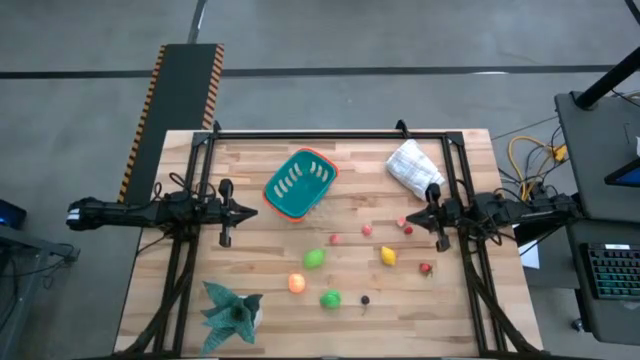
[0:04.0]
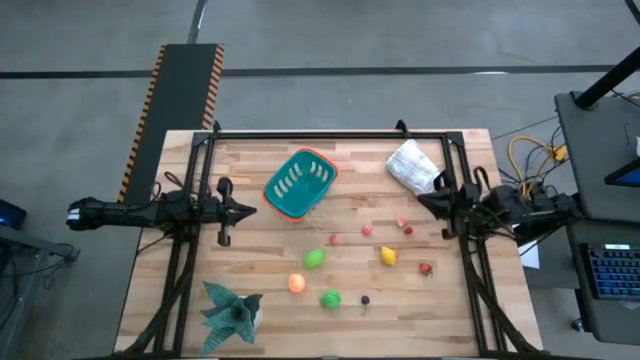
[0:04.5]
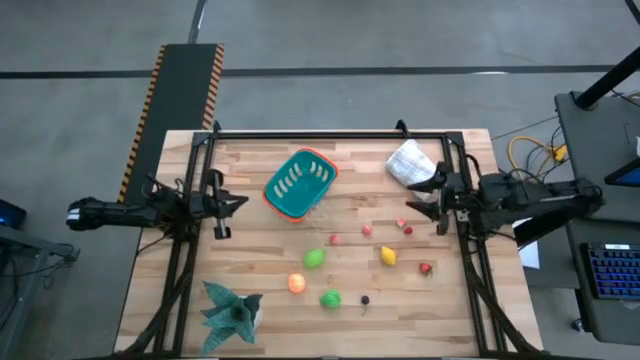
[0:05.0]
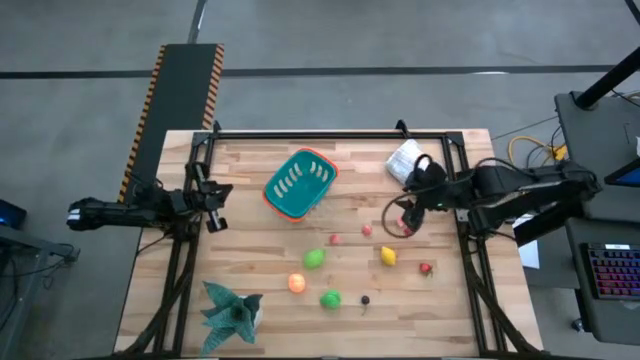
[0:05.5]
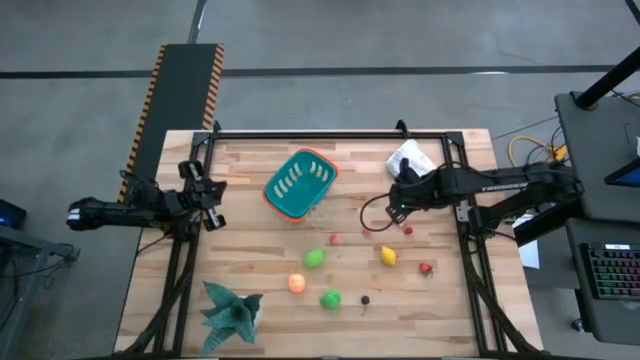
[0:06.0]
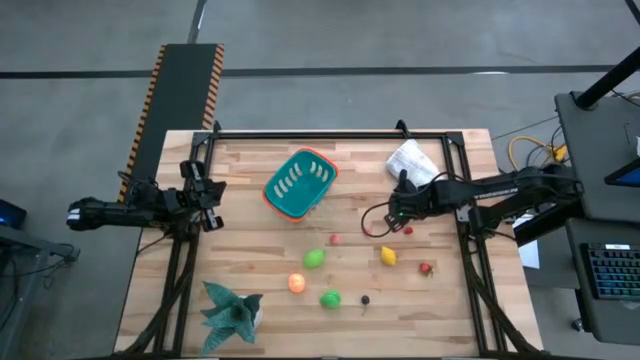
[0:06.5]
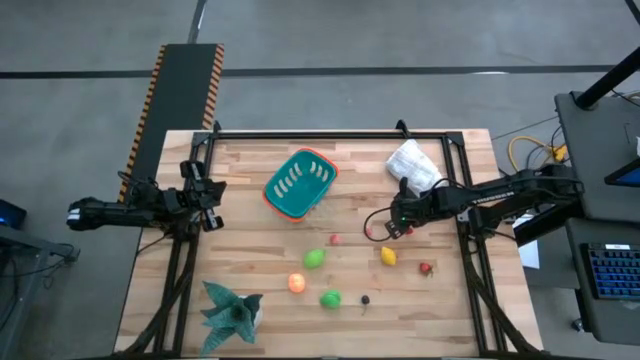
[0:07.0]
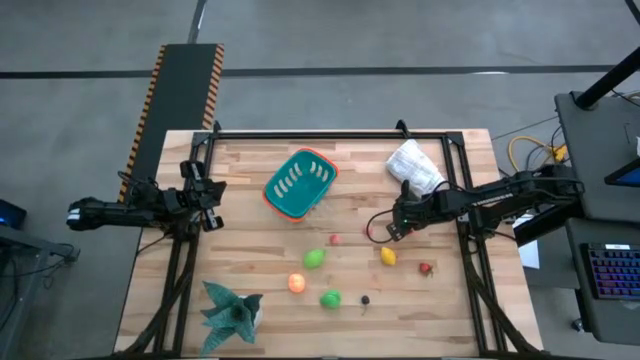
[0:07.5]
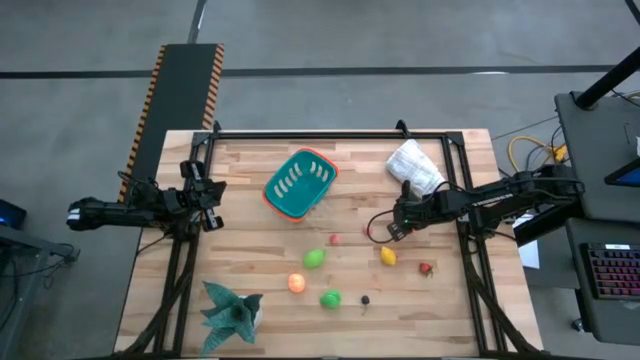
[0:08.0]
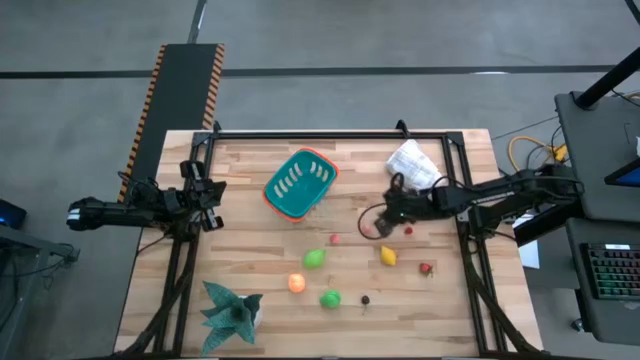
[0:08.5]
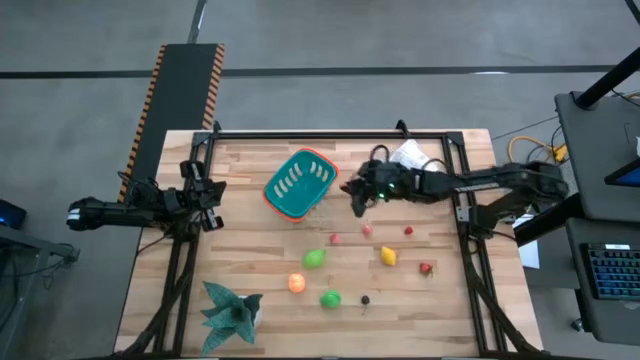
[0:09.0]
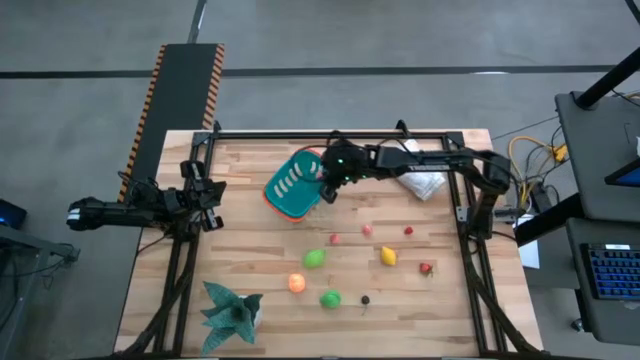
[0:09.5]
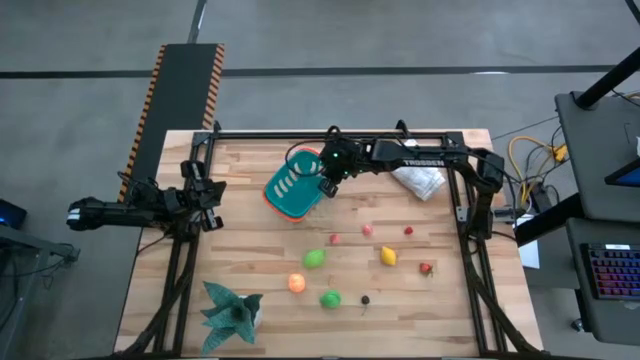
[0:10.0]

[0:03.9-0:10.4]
Task: Pick and placing Produce into tupperware
Put the middle right pink peach into the blue bin

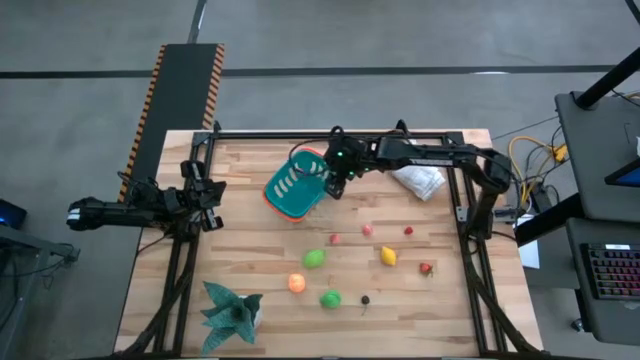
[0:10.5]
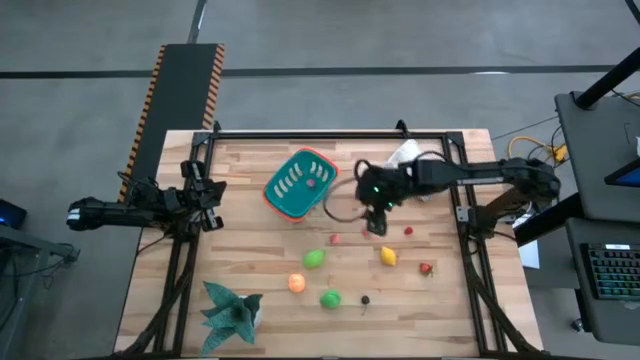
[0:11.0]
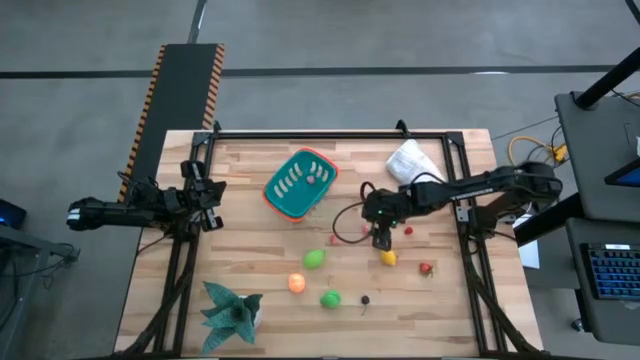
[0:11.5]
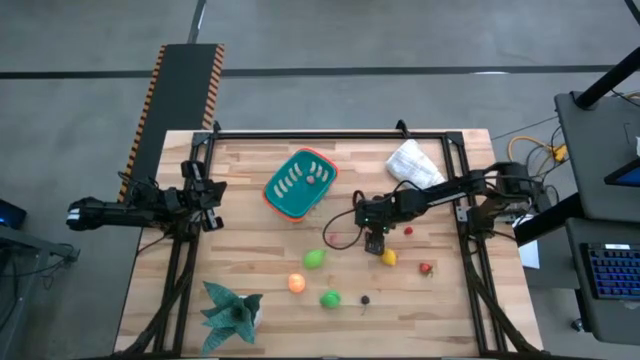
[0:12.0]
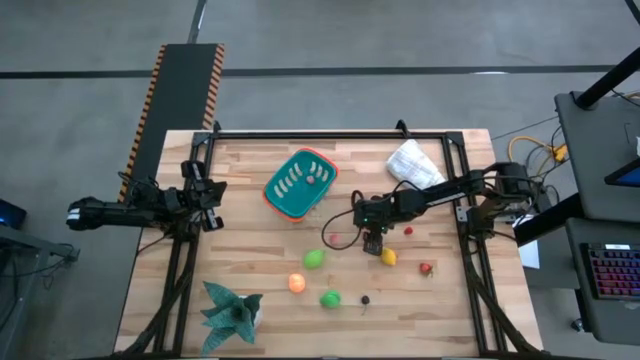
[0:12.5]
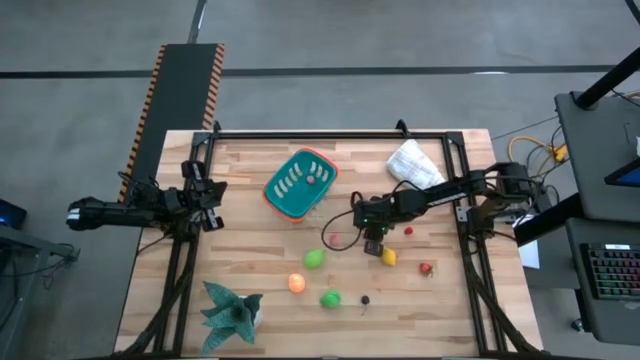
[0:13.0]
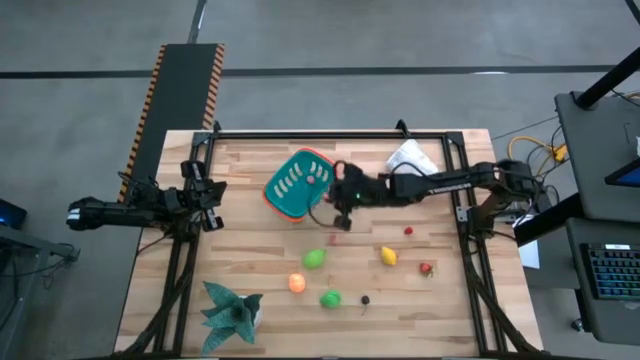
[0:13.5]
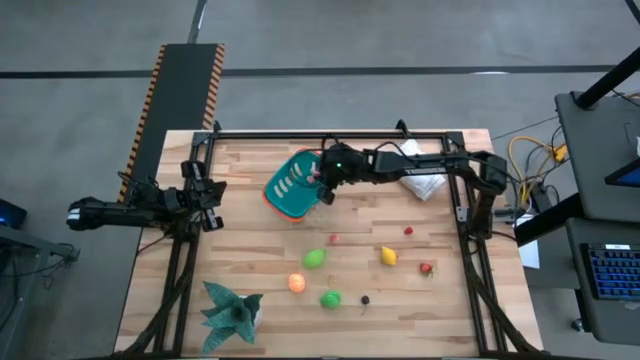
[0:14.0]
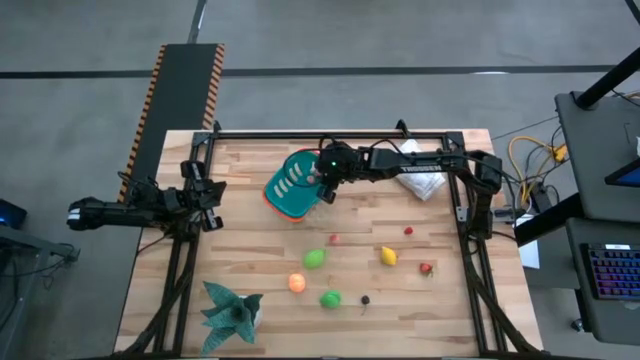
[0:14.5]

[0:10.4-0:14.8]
Put the right pink peach into the blue bin

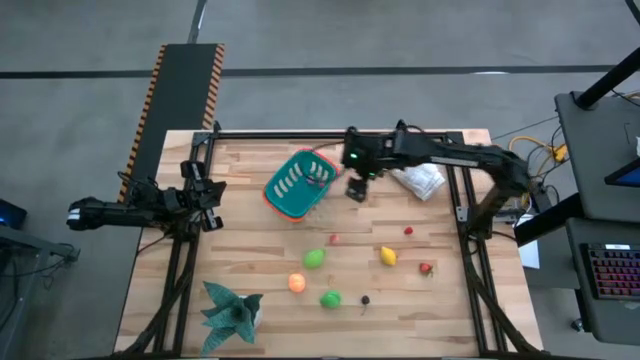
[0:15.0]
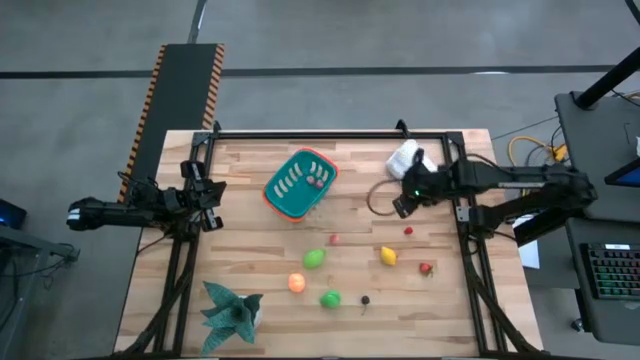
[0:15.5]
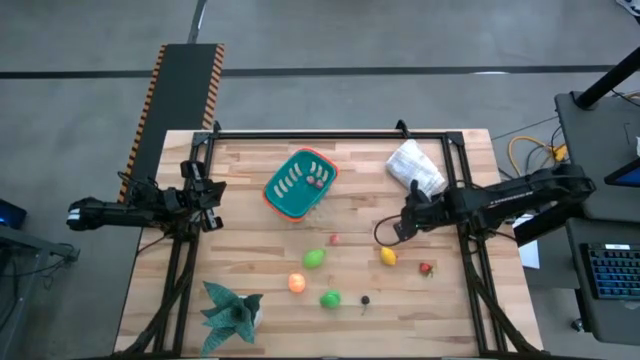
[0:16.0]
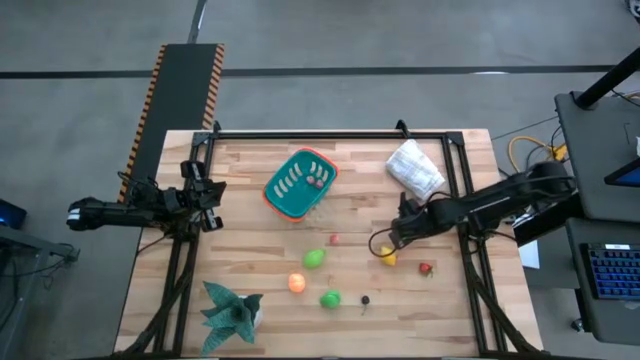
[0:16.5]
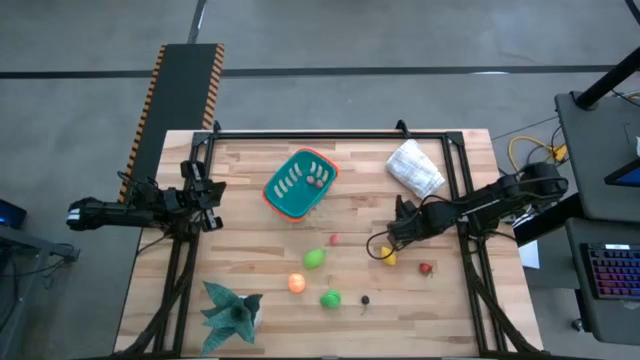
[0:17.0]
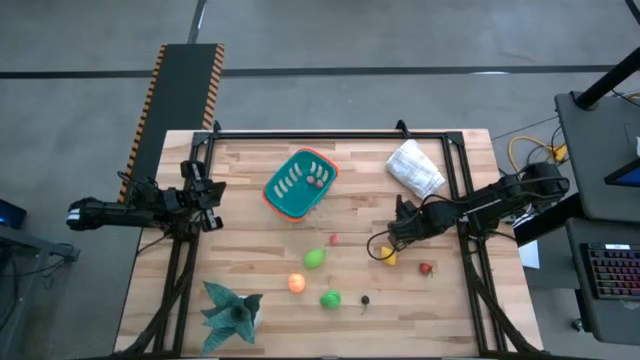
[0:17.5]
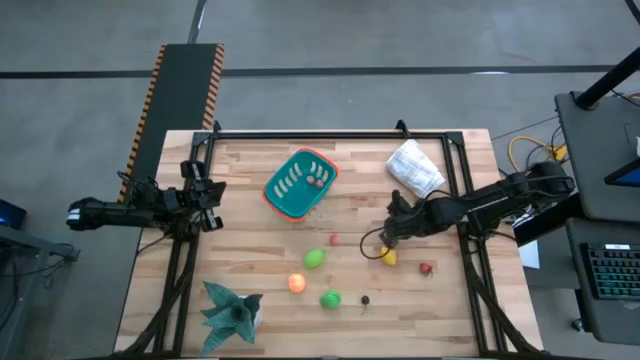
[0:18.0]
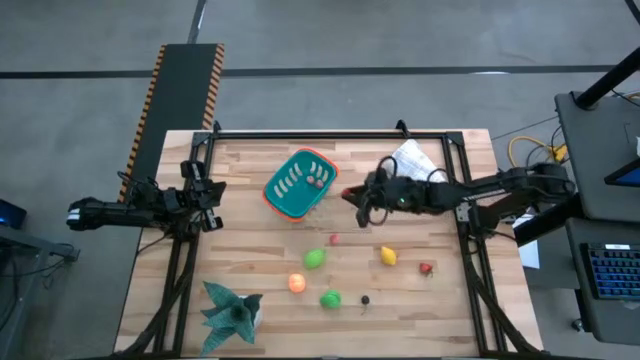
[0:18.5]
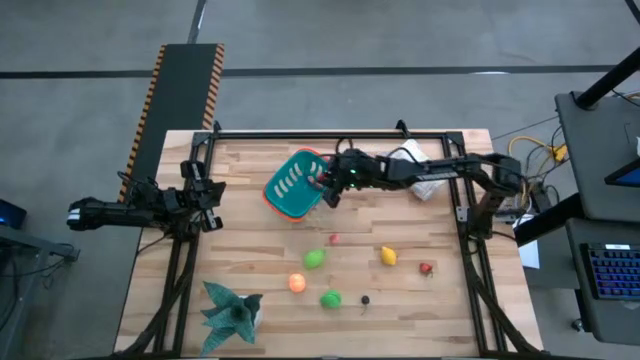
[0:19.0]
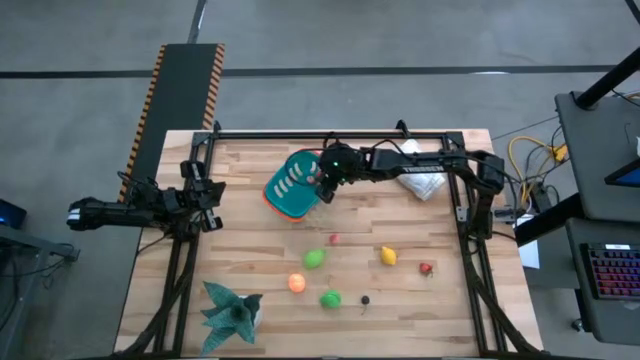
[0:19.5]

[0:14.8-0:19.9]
Put the red raspberry into the blue bin

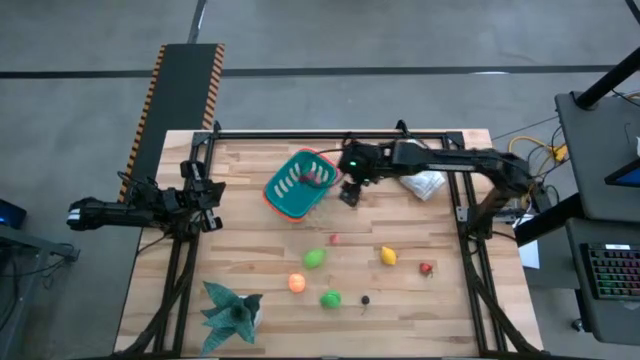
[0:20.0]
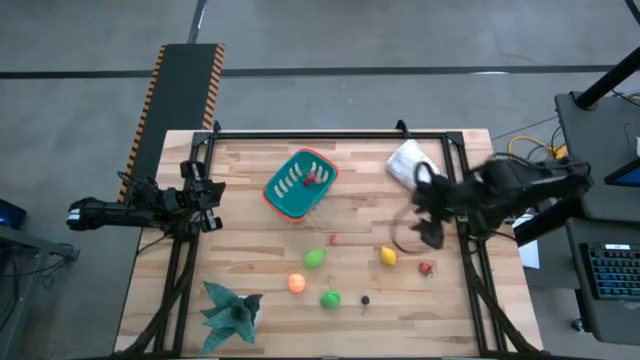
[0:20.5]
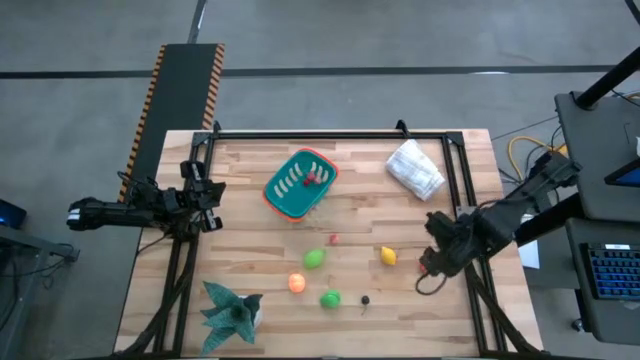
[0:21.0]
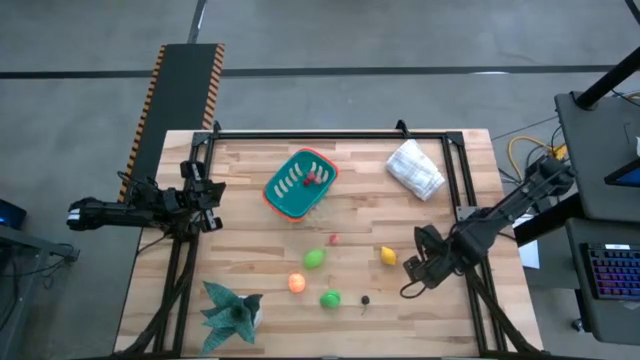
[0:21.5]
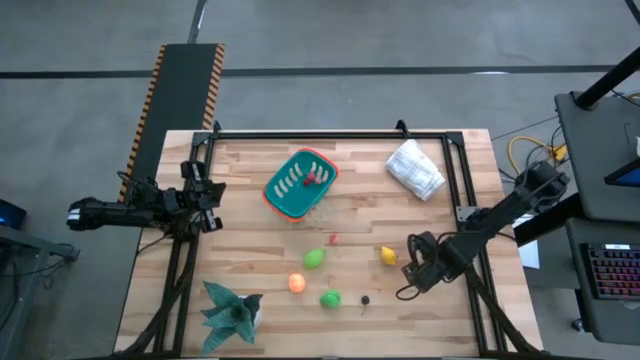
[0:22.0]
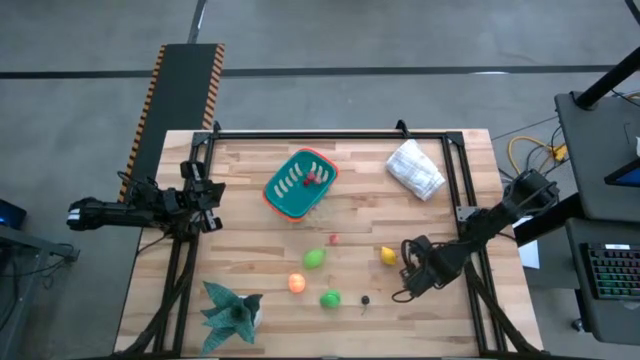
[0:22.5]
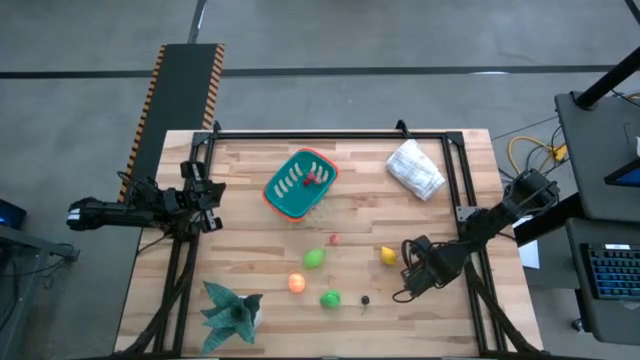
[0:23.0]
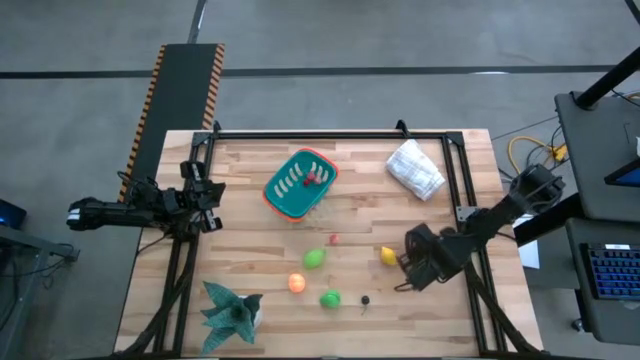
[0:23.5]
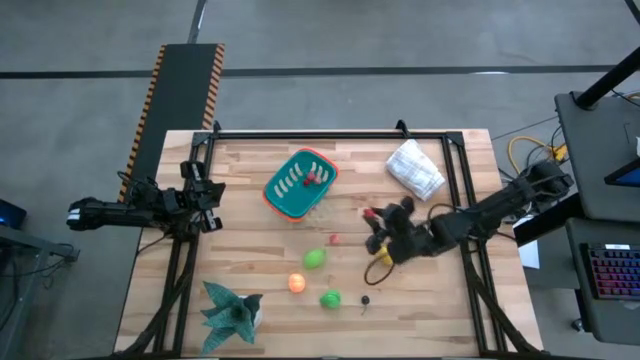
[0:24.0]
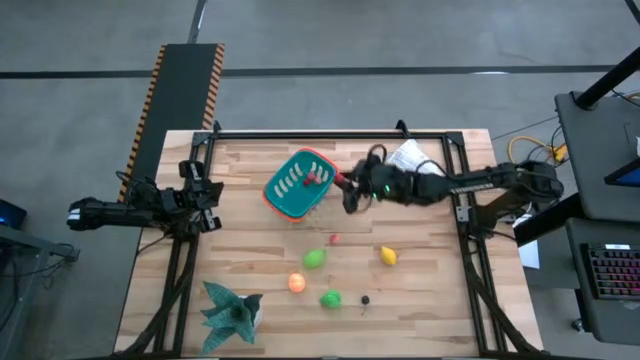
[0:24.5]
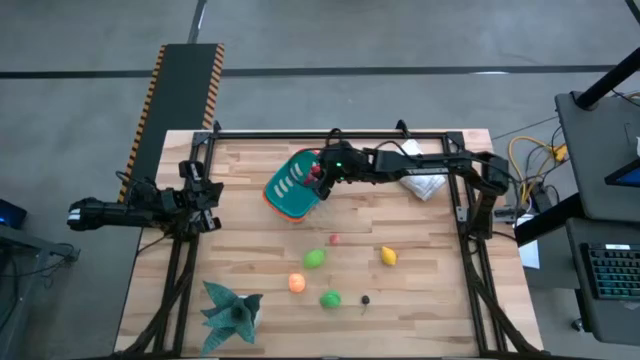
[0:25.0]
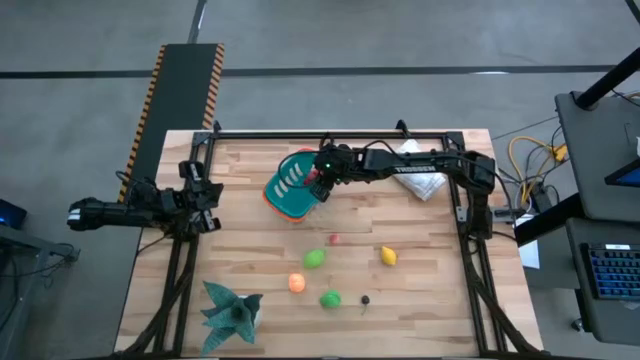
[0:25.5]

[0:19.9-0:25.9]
Put the red strawberry into the blue bin
